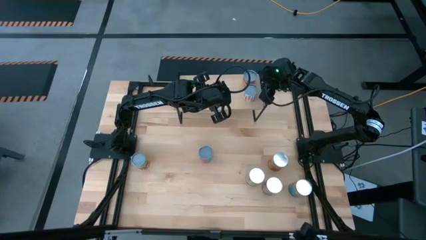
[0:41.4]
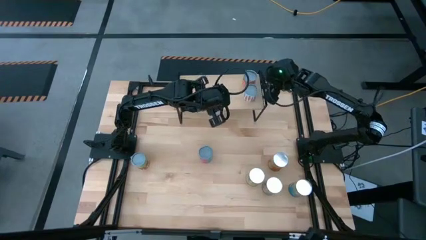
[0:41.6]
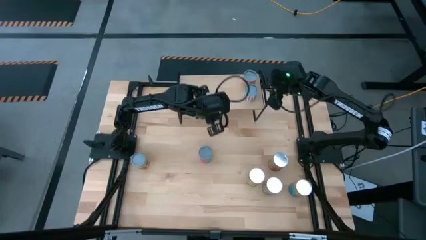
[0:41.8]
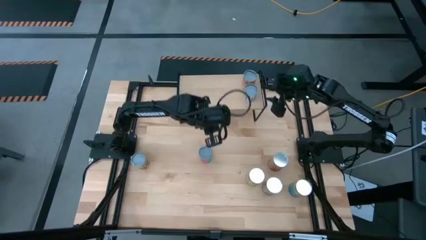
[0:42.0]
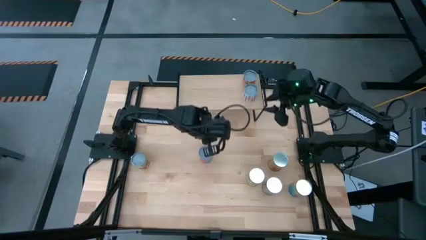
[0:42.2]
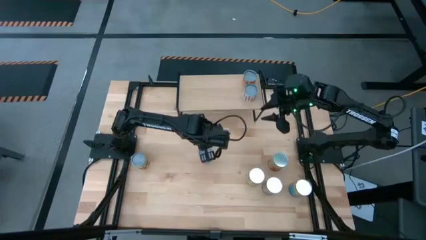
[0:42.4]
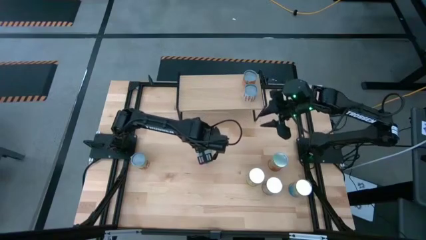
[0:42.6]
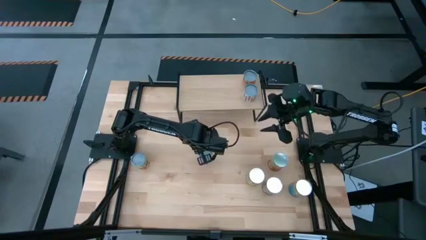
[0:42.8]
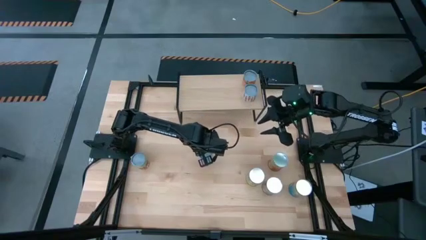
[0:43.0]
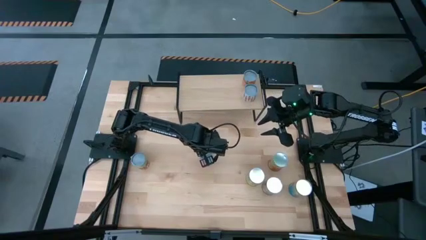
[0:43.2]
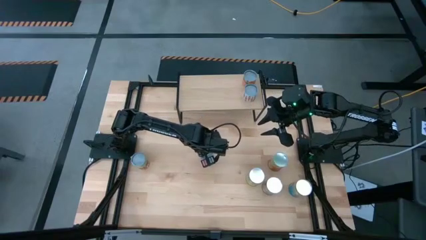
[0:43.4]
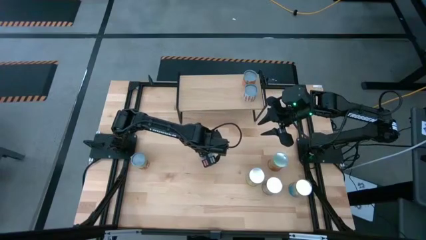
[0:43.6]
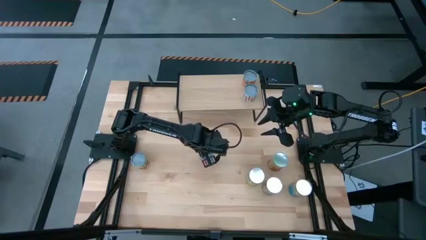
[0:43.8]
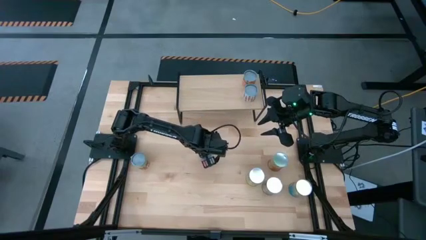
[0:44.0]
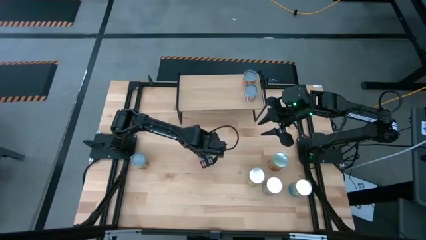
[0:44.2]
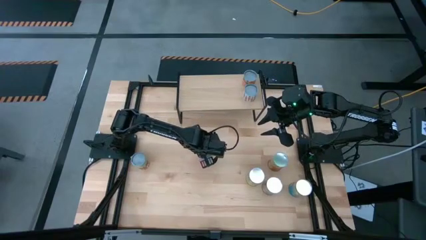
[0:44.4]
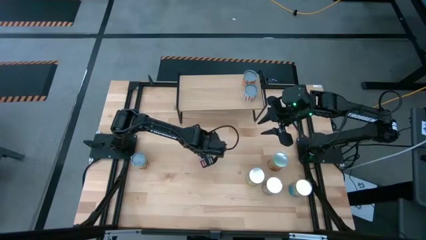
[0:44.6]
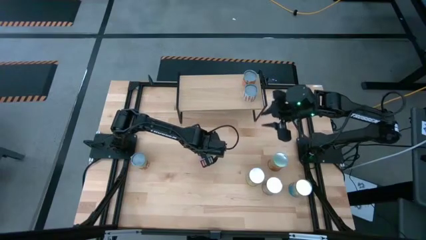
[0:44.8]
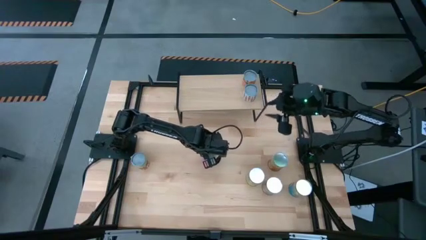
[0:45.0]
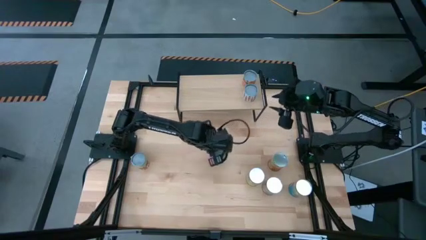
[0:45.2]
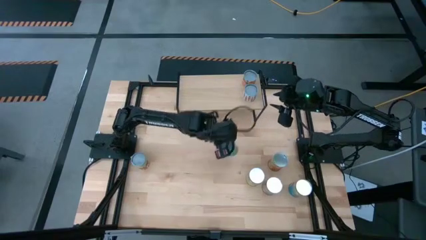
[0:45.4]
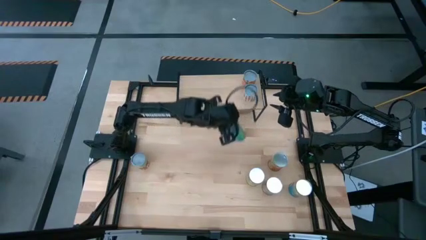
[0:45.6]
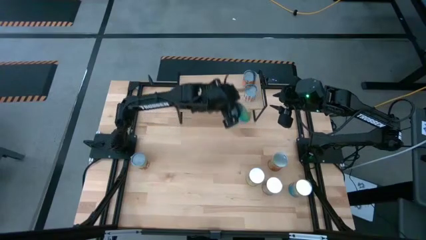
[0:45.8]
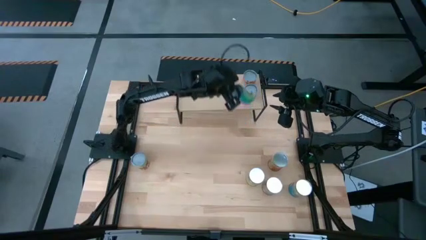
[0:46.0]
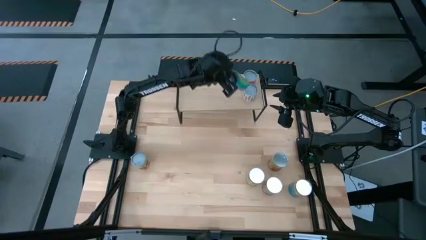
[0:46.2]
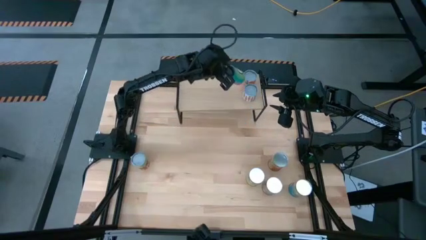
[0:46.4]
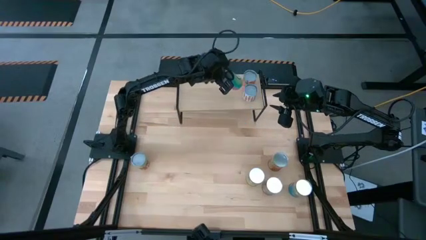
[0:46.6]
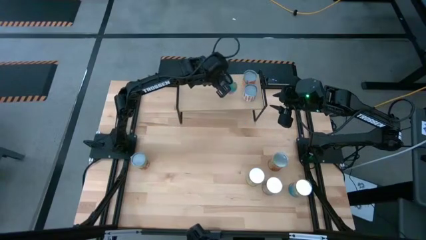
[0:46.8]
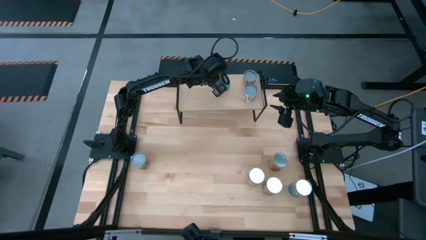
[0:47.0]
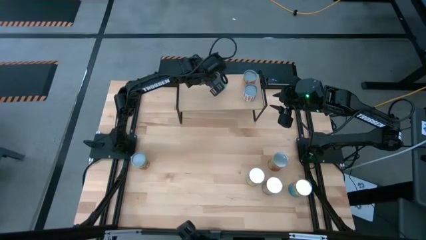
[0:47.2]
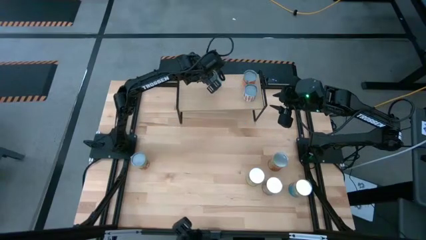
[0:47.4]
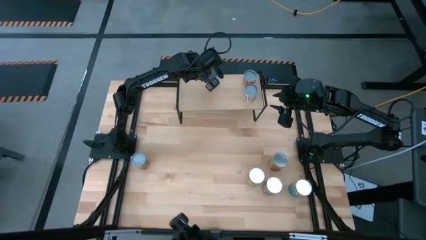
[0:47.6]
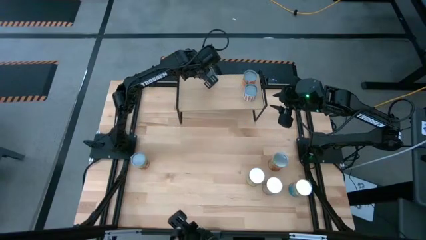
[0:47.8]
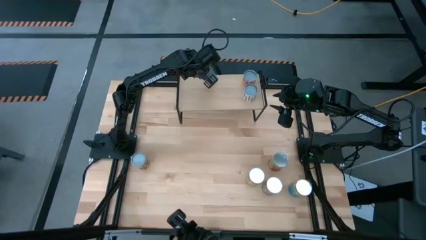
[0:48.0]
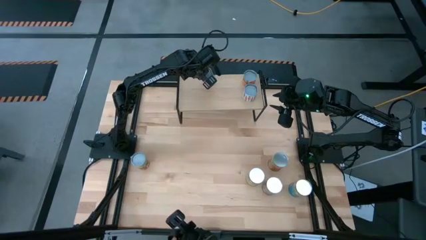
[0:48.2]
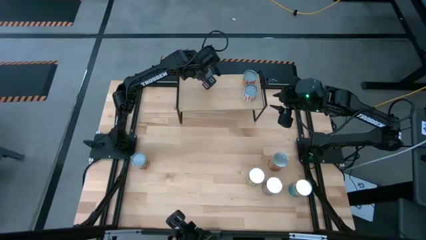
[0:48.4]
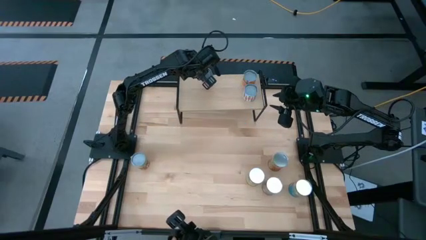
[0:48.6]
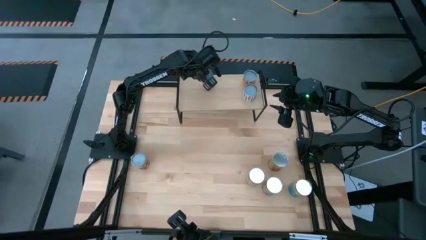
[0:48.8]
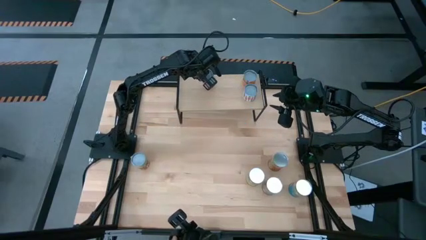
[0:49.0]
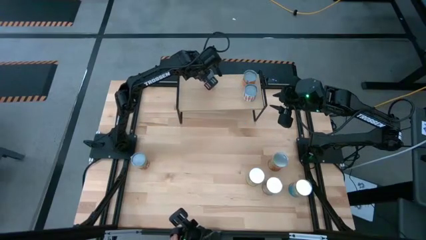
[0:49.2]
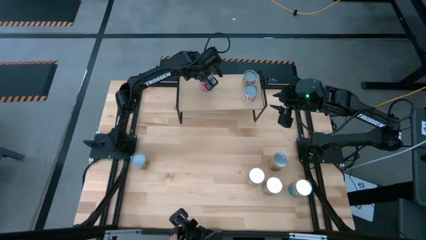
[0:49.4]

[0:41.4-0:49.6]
Task: Pick and place cans onto a shelf
Put the pink canned vegetable on the shelf

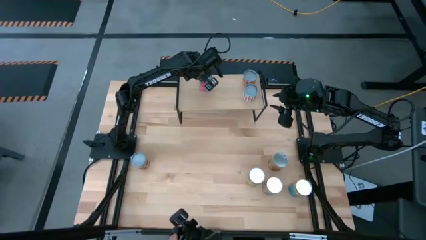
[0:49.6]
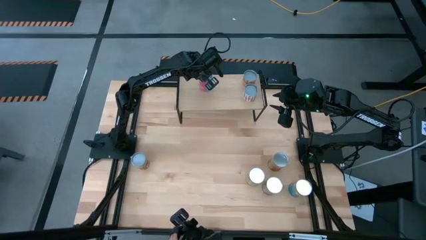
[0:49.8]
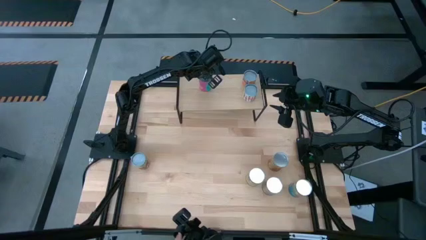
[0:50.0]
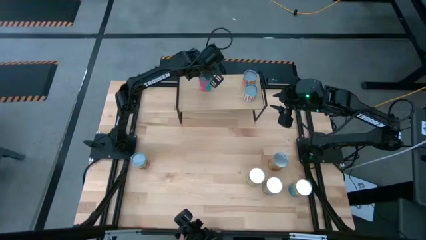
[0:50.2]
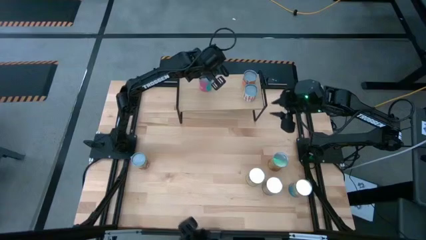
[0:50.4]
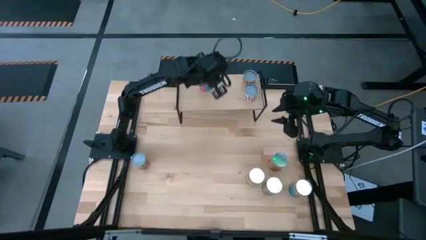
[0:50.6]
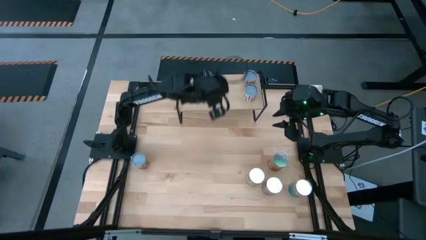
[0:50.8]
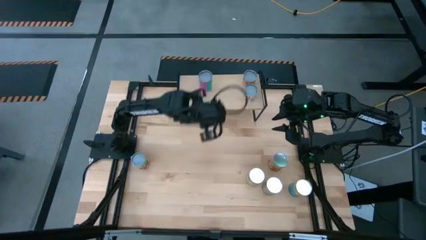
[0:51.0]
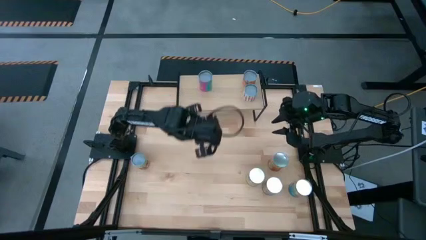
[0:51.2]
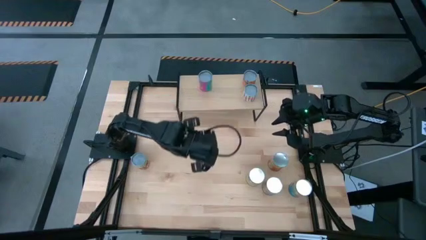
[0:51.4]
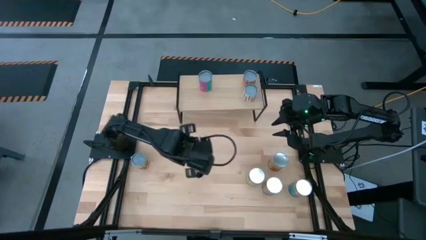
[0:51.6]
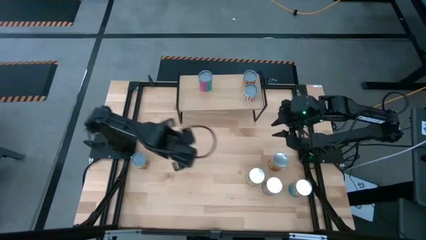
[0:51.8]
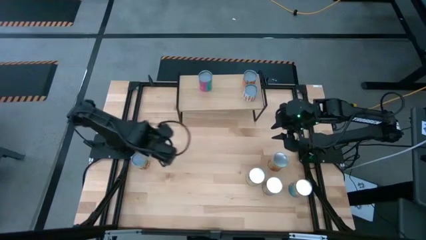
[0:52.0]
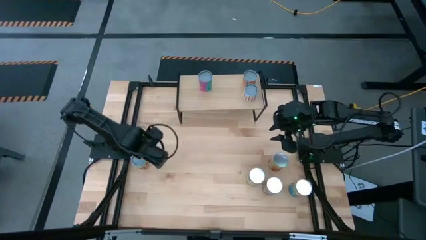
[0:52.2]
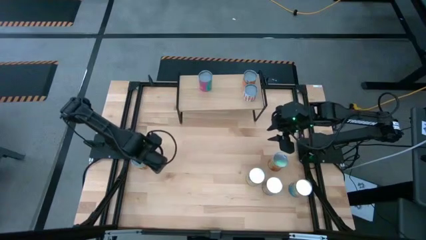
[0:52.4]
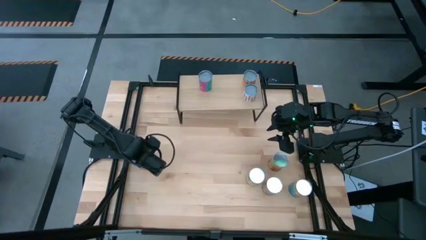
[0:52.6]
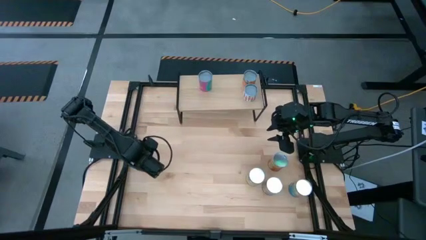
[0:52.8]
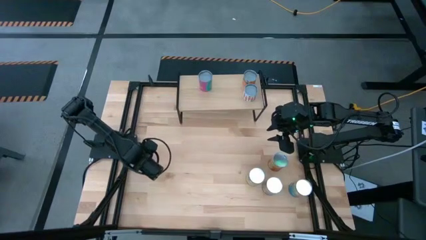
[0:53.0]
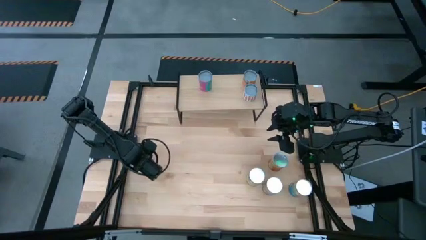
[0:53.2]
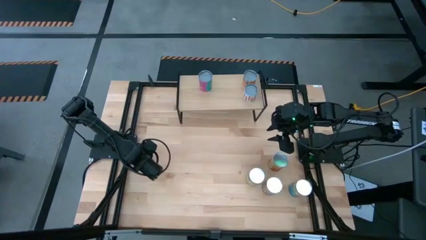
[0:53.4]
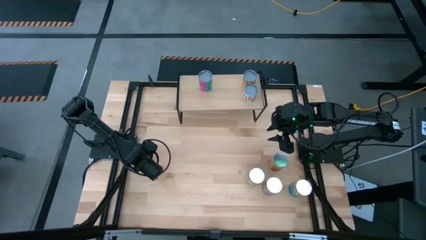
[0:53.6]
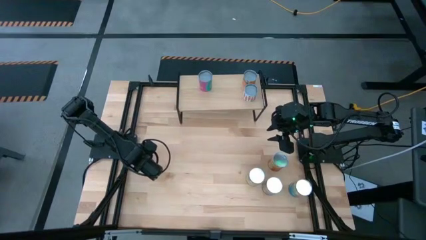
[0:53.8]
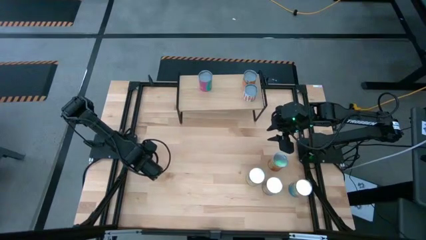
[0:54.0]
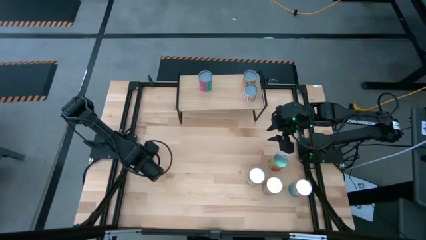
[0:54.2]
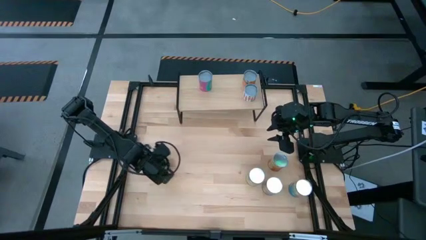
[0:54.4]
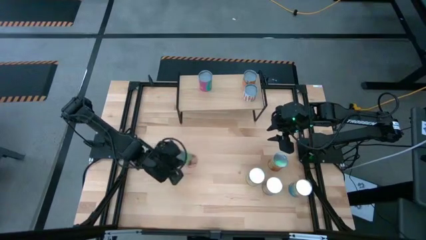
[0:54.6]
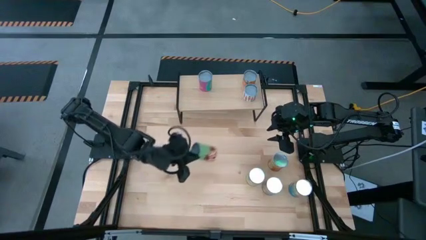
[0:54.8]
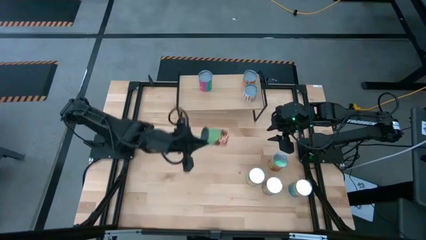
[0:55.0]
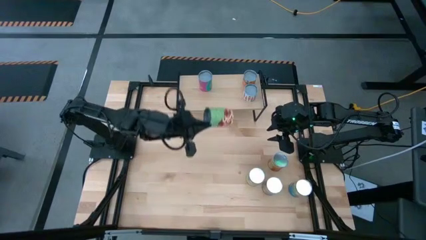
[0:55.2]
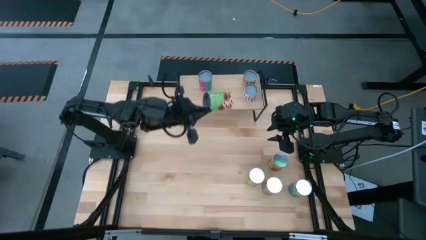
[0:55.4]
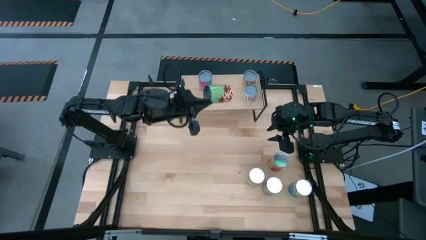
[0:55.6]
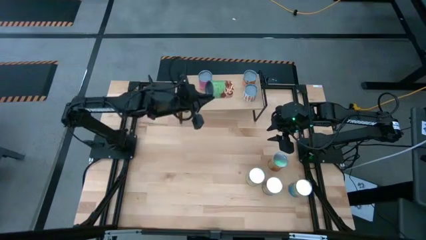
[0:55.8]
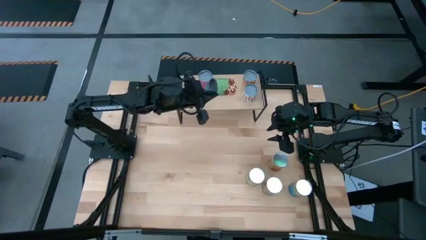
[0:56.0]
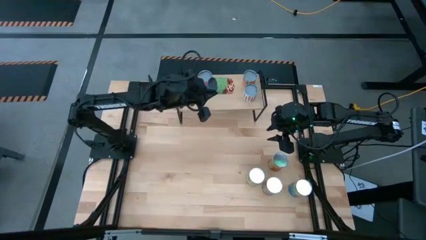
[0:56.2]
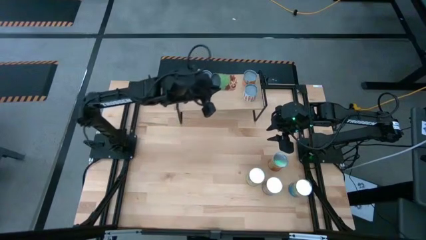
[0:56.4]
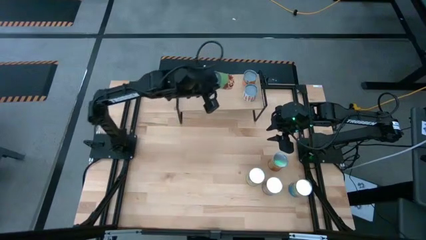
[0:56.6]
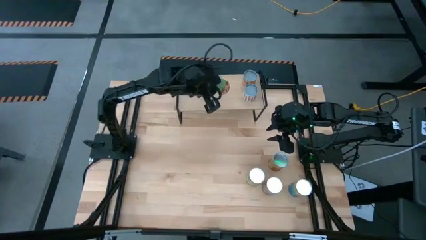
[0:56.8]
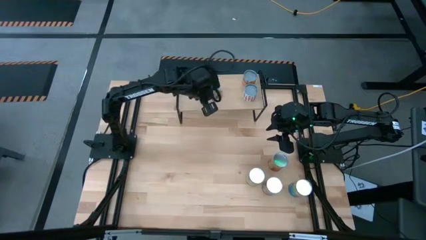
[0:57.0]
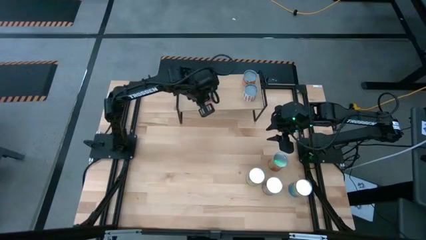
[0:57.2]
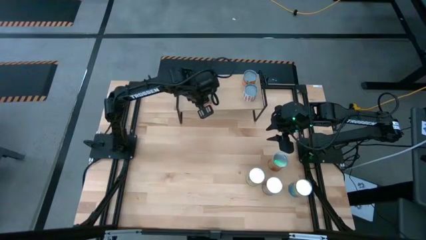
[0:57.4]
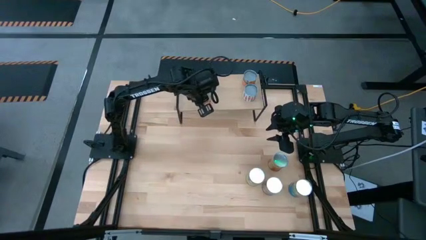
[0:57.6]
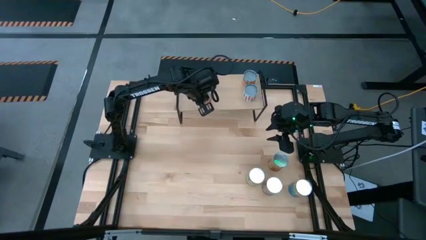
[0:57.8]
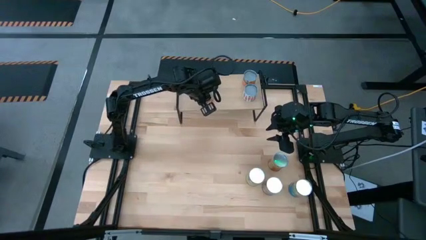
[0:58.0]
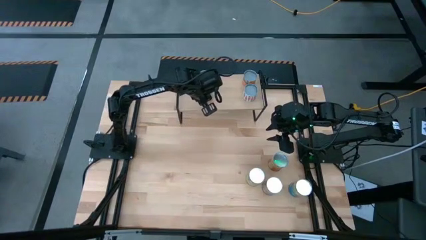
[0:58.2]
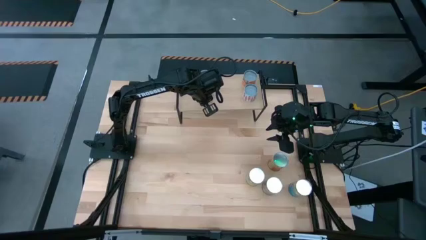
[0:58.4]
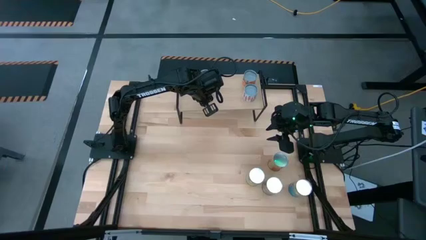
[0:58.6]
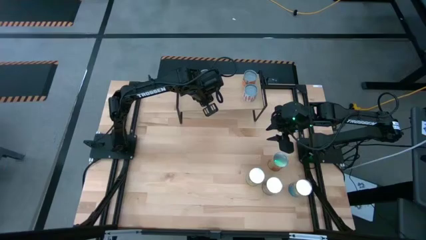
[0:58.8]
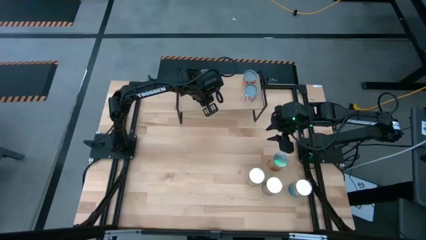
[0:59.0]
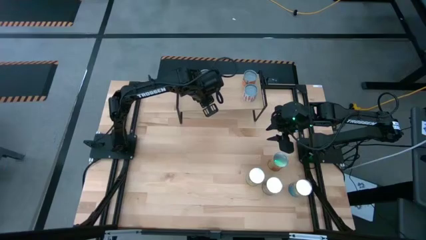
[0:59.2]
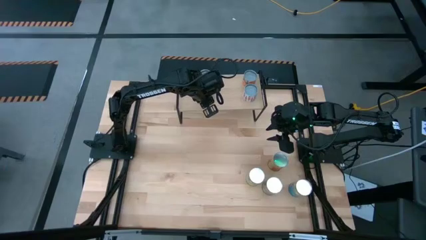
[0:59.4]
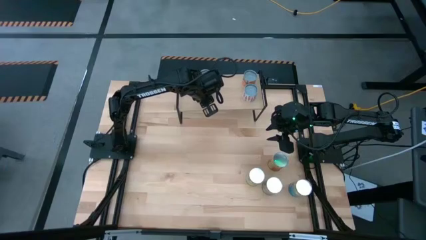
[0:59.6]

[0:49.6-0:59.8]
Put the green canned vegetable on the shelf
